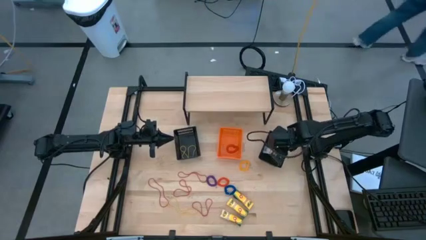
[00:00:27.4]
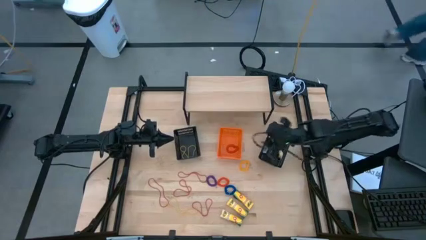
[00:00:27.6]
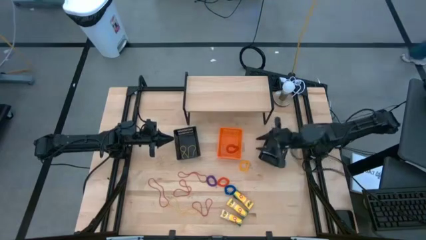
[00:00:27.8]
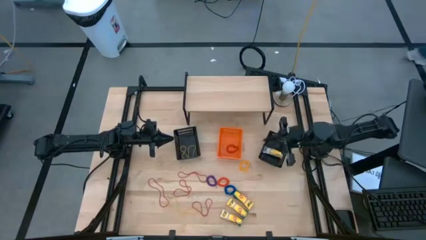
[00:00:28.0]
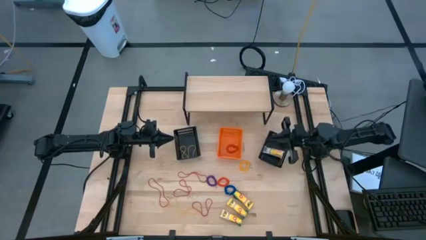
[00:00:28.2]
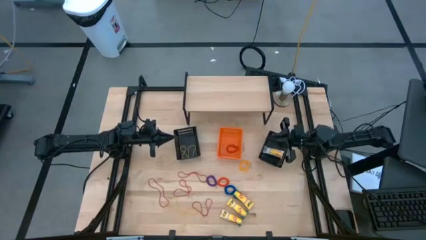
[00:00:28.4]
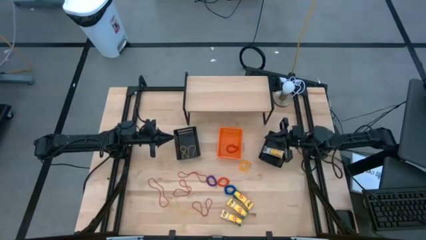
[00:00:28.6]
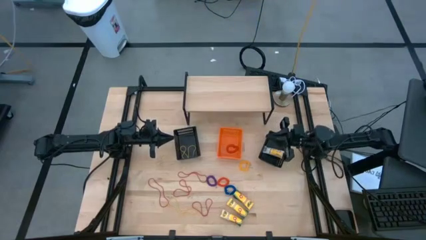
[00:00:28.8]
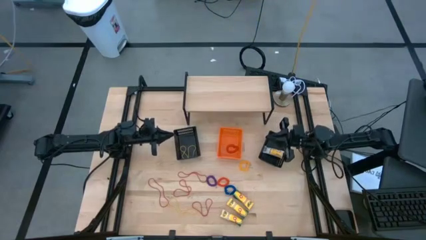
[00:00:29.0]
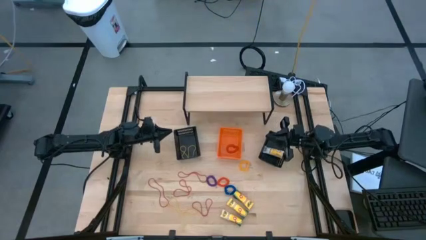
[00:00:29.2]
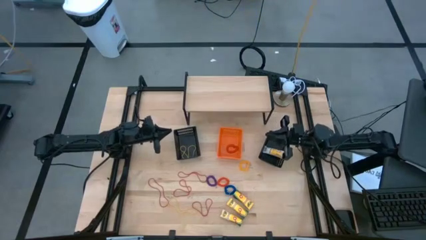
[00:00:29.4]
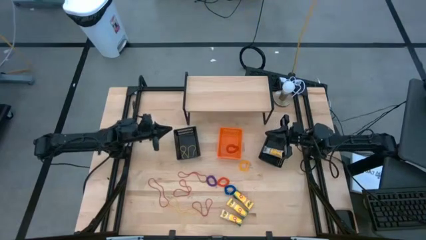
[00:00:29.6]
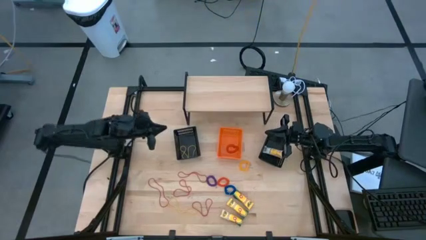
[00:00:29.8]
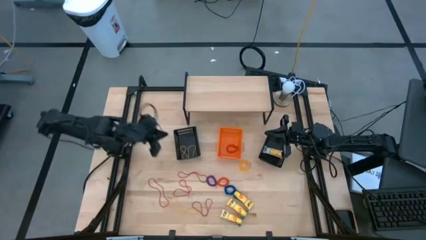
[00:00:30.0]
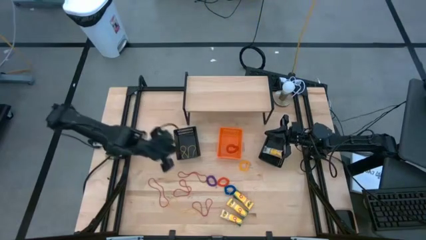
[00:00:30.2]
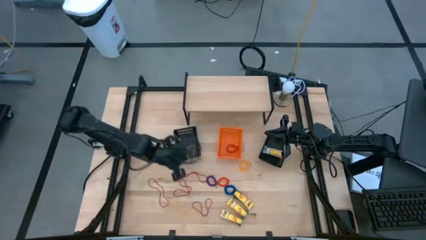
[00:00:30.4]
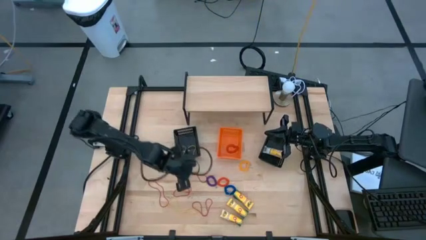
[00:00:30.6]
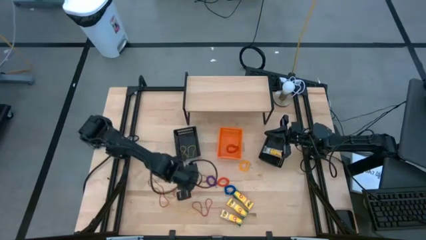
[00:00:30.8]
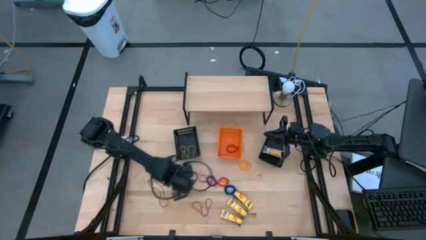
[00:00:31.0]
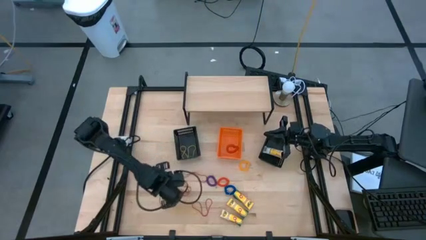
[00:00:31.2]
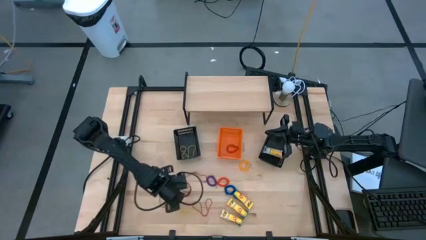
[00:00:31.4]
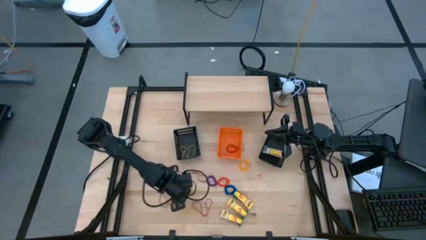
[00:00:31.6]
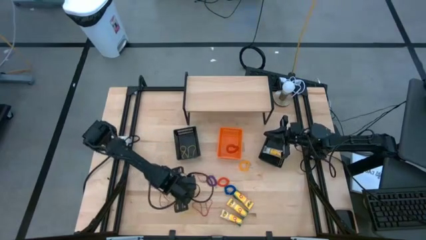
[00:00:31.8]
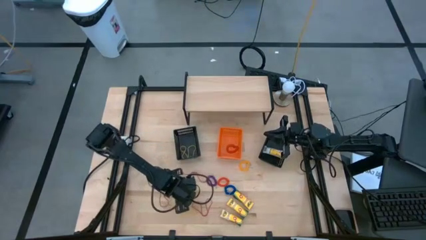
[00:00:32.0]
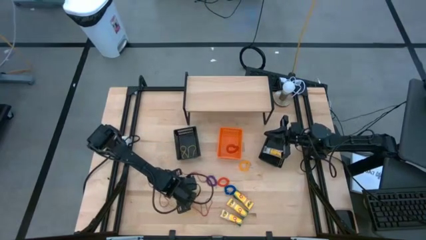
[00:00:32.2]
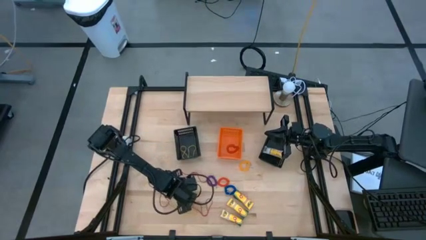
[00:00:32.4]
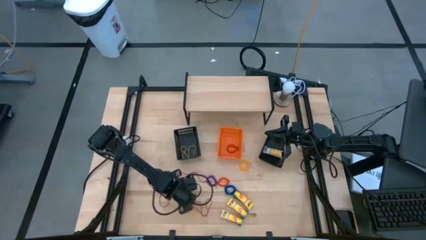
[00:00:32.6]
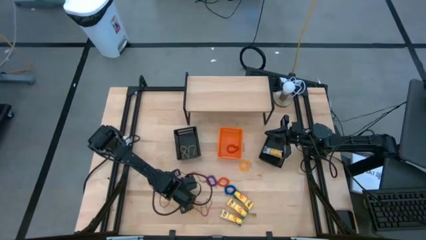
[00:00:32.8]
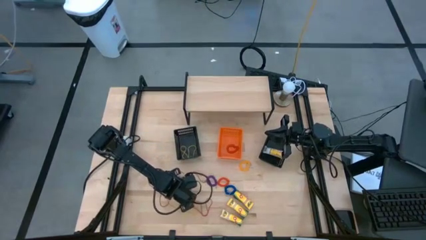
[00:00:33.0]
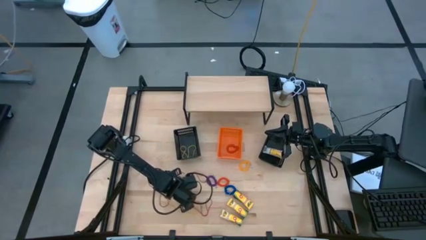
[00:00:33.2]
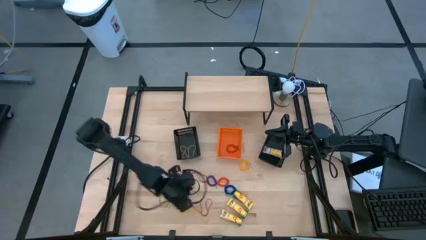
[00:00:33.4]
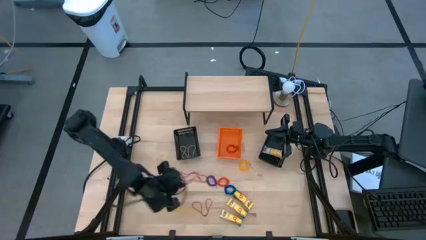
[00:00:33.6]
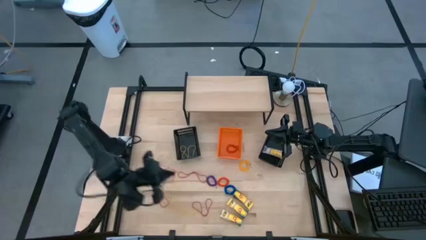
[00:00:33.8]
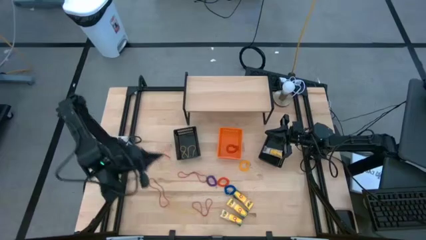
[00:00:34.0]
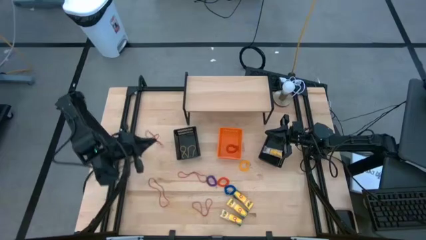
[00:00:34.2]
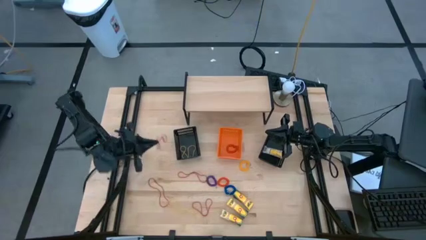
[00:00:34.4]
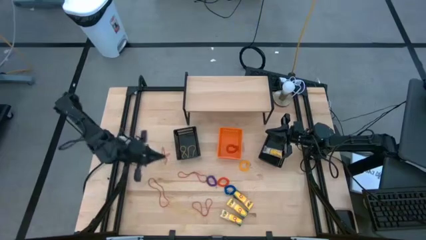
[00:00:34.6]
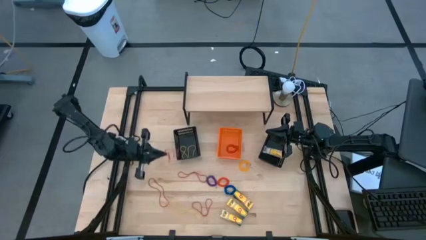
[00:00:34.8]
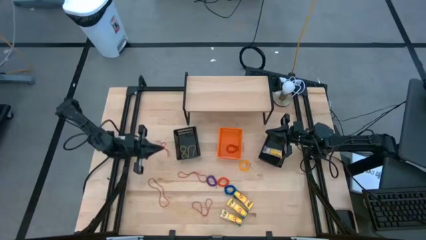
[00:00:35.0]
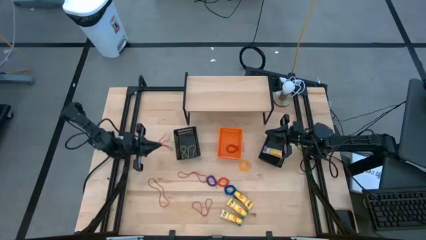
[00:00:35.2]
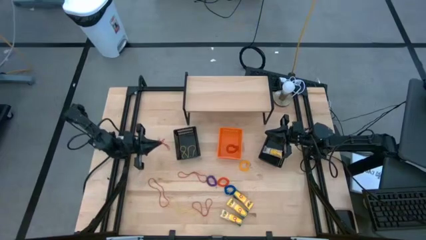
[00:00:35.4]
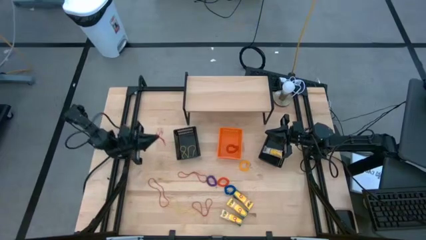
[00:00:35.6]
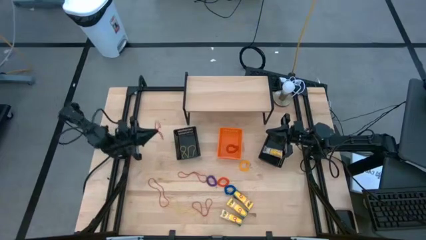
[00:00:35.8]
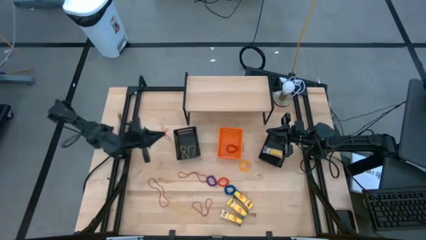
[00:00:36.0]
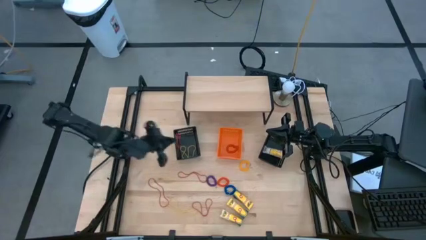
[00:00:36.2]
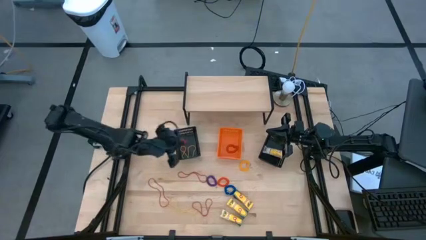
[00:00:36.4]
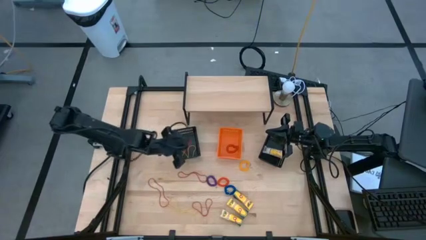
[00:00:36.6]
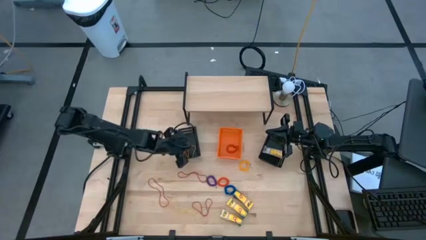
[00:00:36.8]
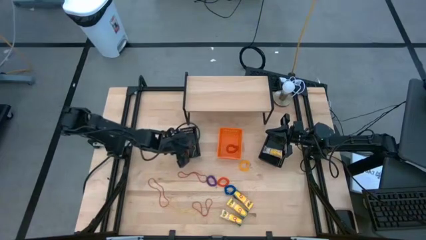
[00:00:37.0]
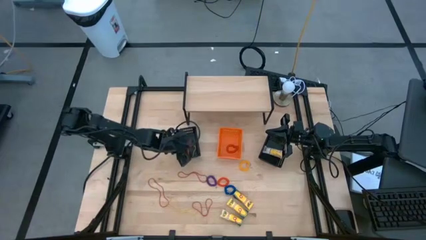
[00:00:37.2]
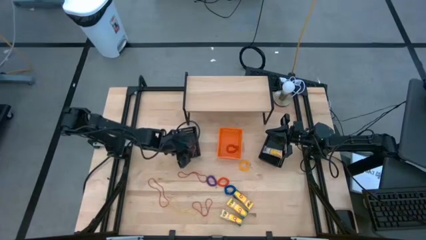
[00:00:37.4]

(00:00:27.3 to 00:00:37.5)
Task: Pick & Place Office Desk Supplies
Put the red rubber band into the left black bin

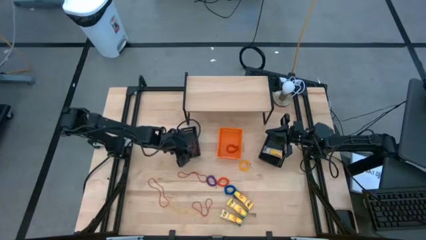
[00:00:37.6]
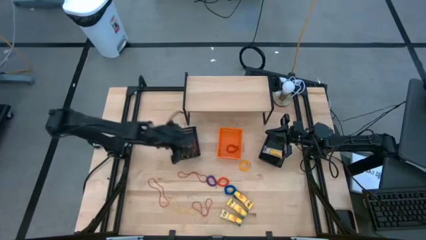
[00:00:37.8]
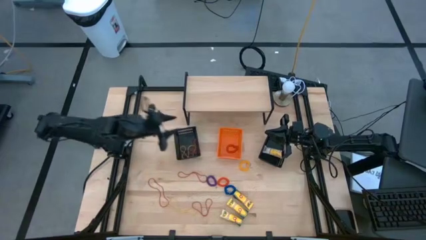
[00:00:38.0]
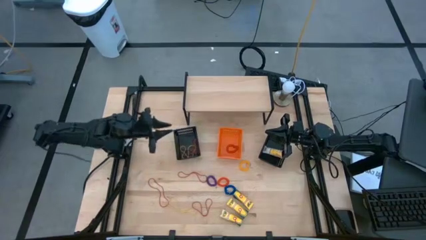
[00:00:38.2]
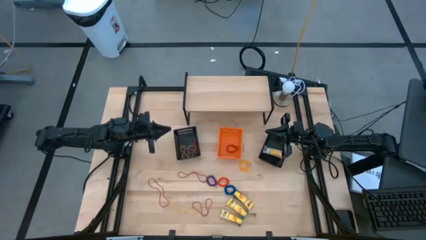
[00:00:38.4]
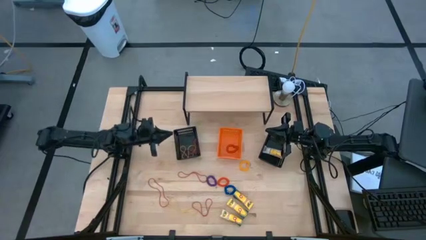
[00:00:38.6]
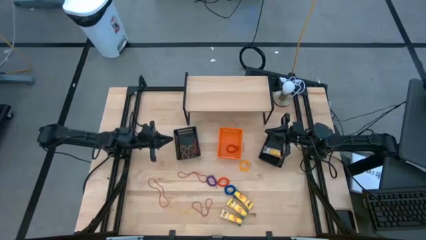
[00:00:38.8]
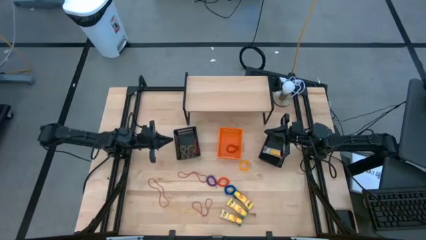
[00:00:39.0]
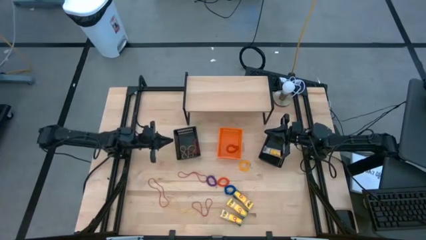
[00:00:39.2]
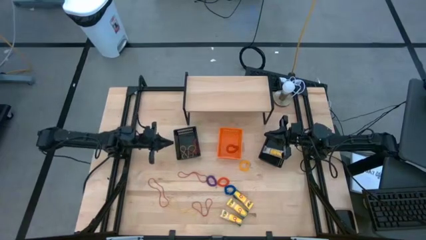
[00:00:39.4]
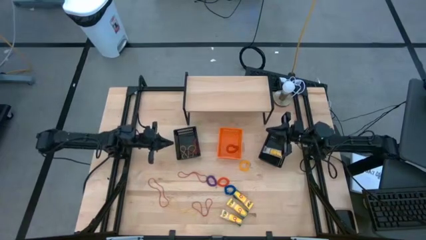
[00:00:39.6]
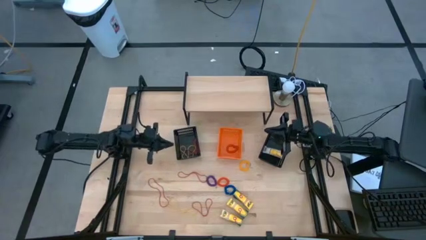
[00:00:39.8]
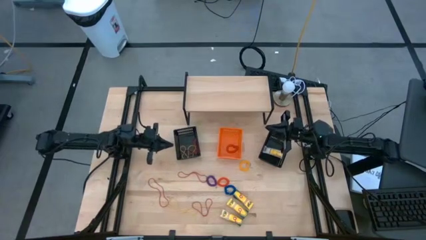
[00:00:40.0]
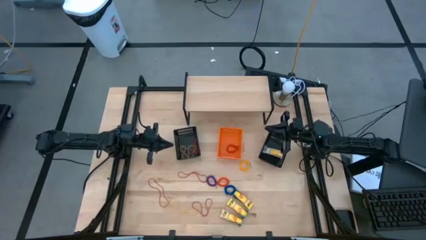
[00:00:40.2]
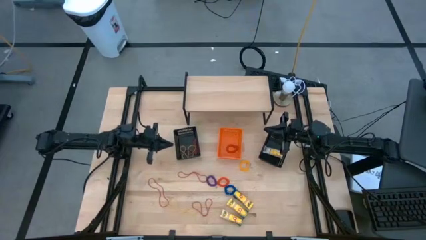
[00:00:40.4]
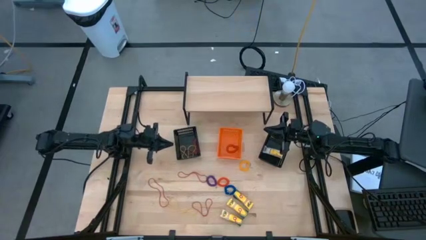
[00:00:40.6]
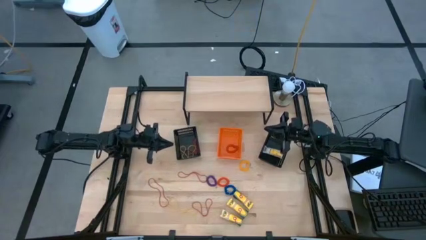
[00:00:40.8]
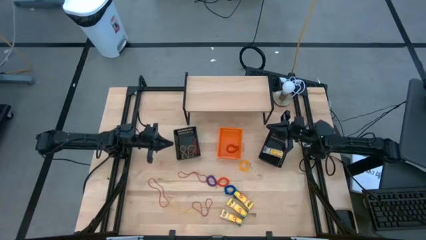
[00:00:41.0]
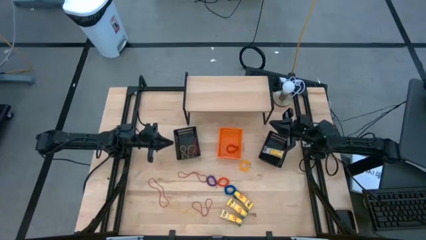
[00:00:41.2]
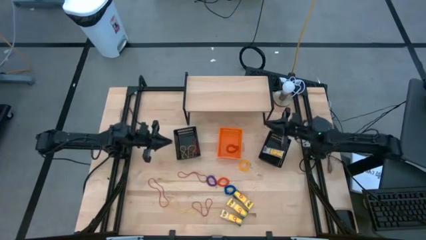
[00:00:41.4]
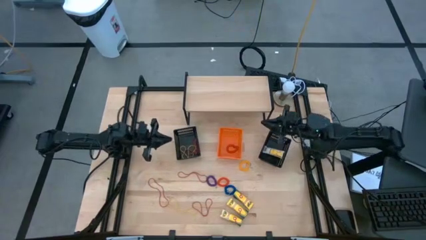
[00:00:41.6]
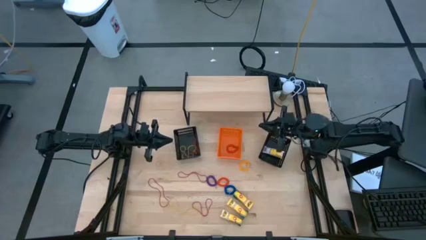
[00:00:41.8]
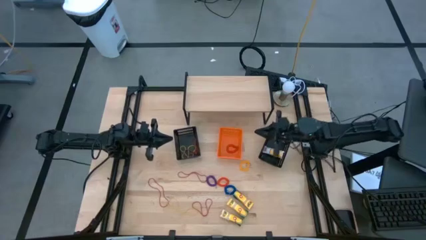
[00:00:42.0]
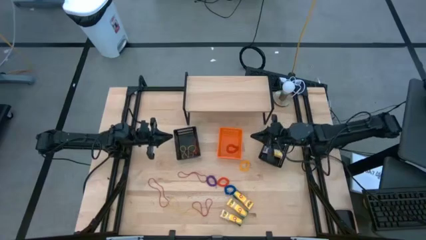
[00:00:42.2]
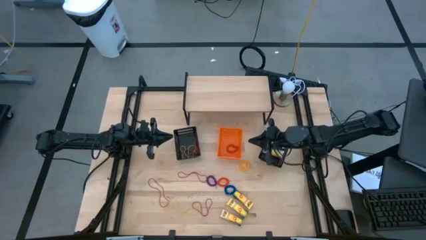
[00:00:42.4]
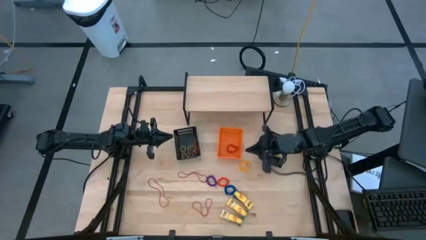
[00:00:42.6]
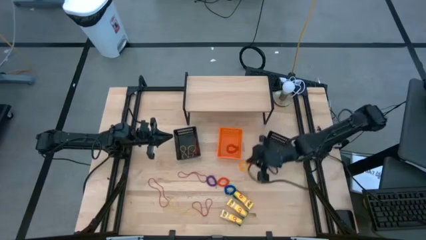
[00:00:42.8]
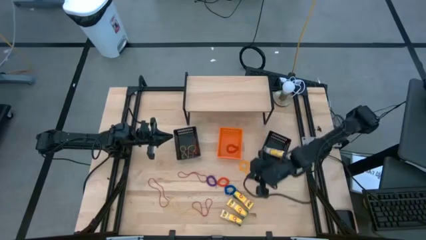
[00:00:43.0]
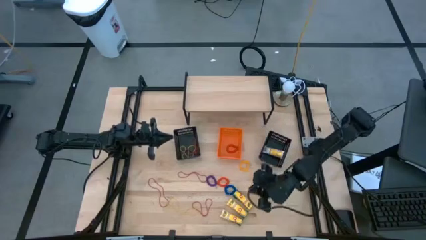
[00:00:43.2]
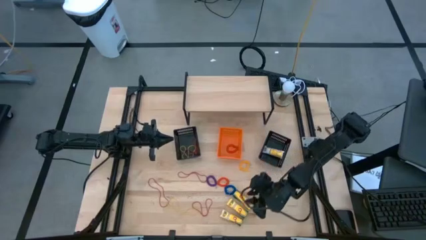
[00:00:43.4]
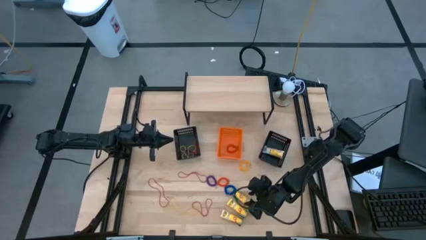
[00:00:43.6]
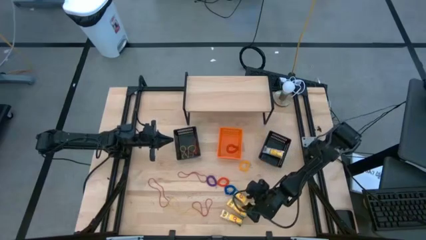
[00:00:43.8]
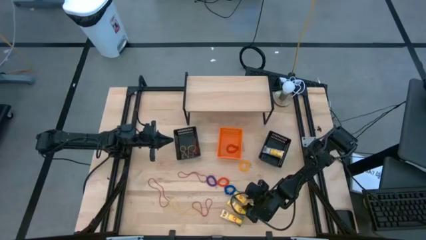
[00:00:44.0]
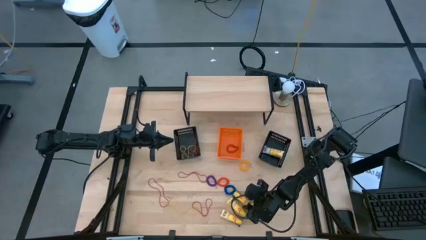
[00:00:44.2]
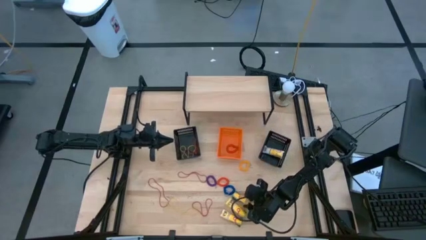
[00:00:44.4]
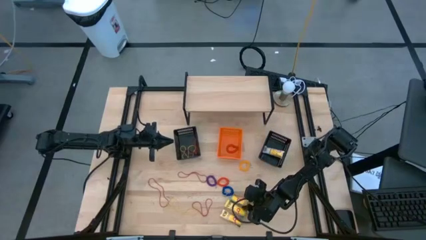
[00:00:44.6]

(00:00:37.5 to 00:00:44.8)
Put the yellow crayon box into the right black bin
